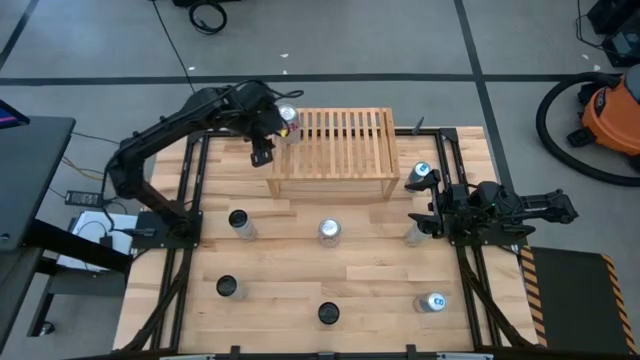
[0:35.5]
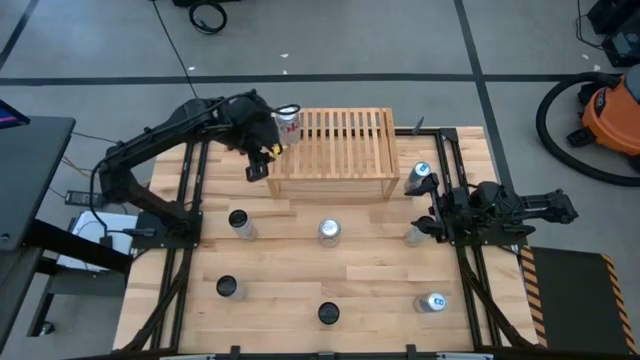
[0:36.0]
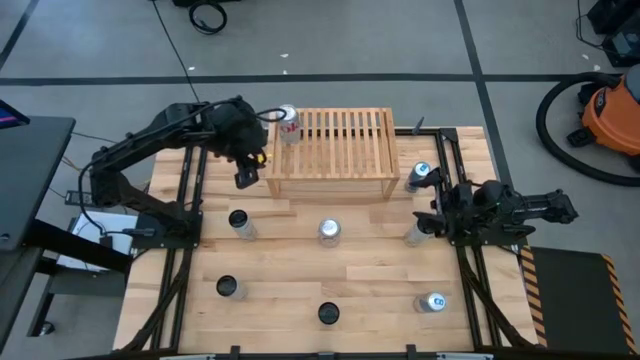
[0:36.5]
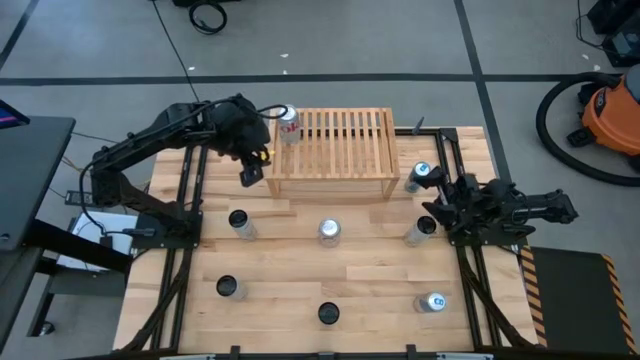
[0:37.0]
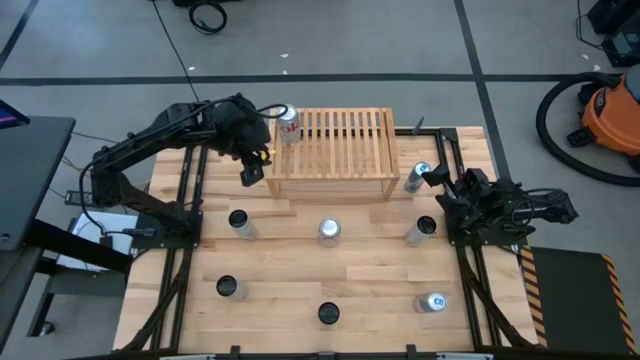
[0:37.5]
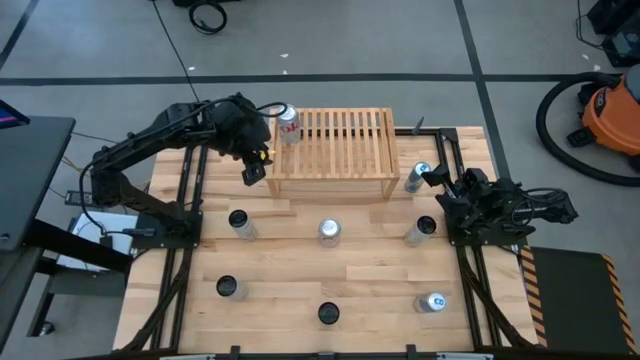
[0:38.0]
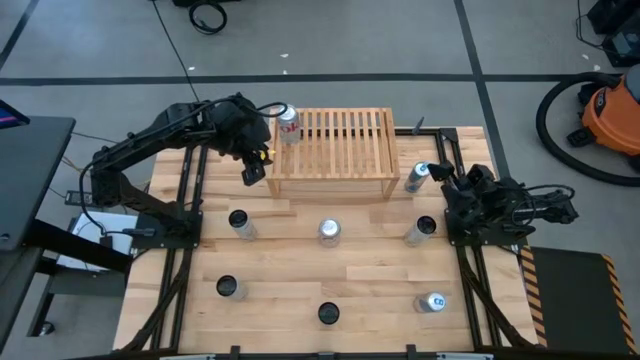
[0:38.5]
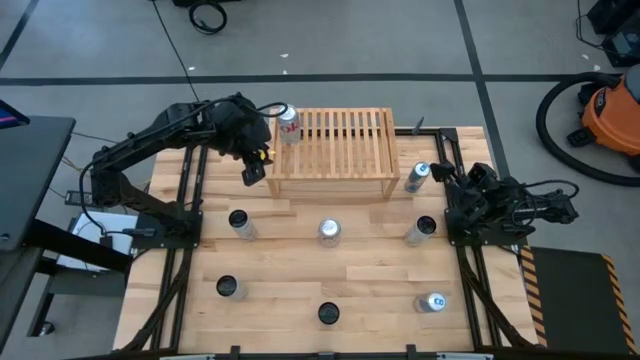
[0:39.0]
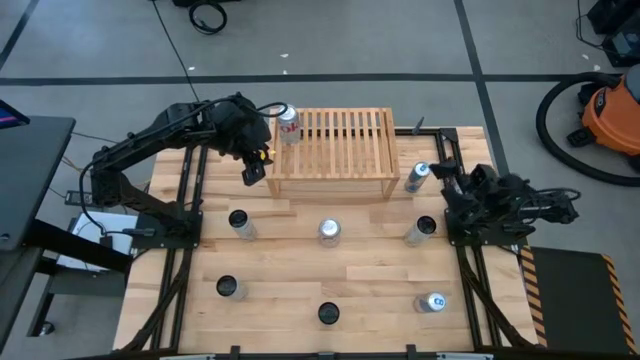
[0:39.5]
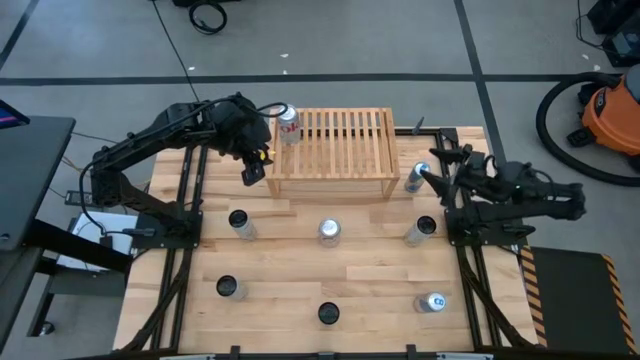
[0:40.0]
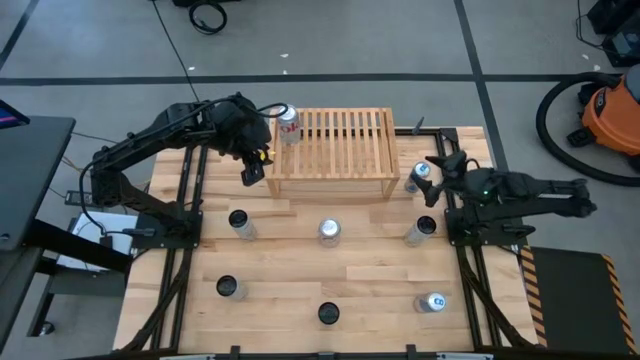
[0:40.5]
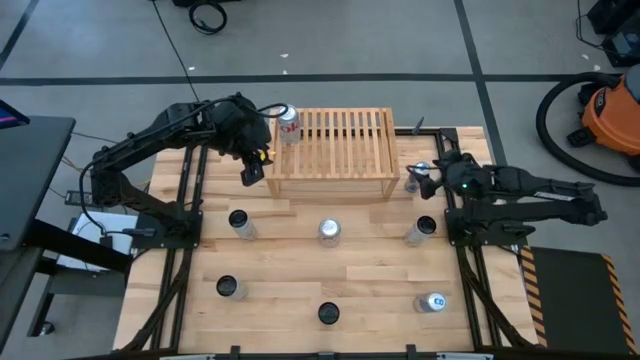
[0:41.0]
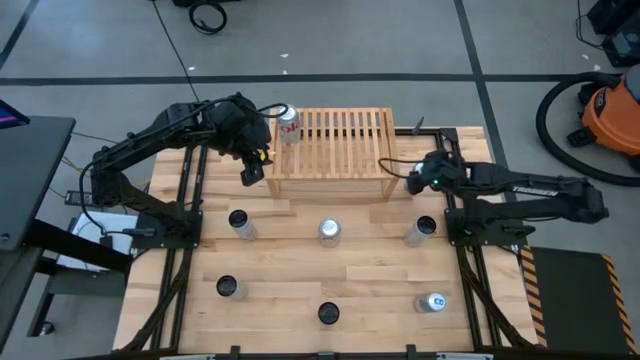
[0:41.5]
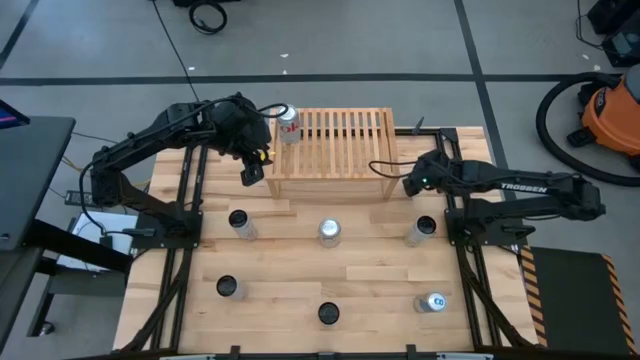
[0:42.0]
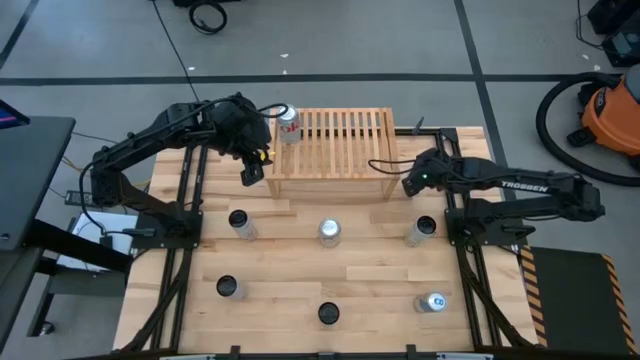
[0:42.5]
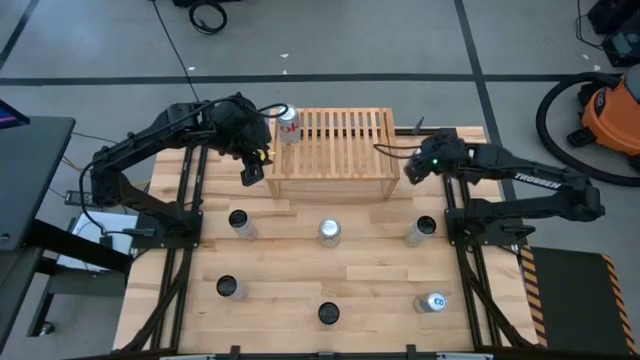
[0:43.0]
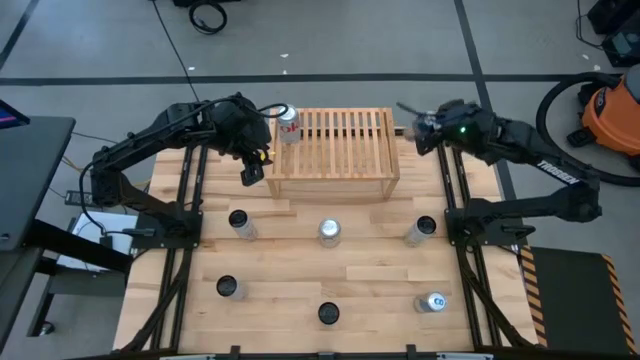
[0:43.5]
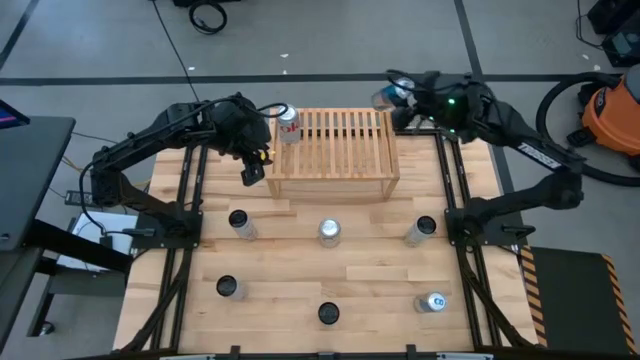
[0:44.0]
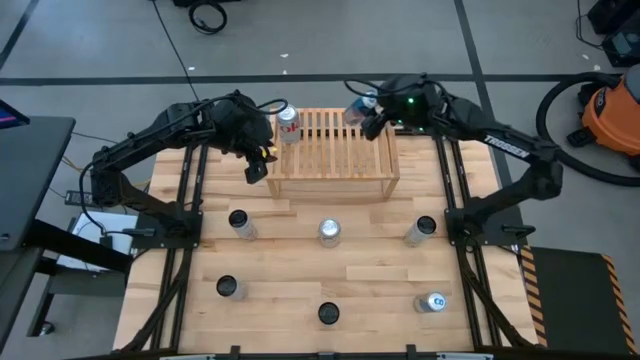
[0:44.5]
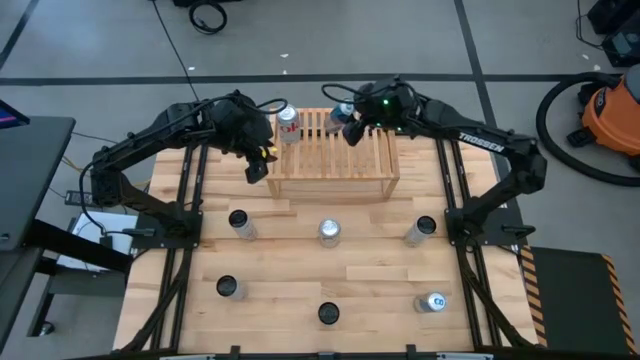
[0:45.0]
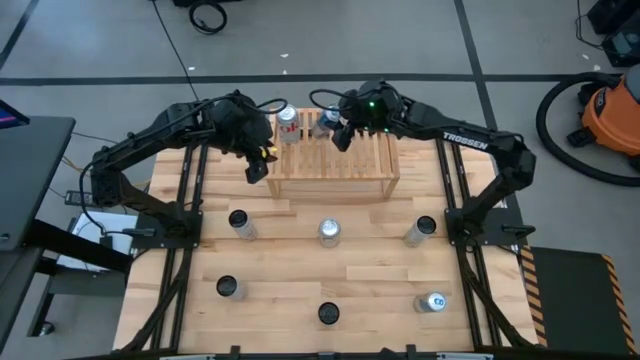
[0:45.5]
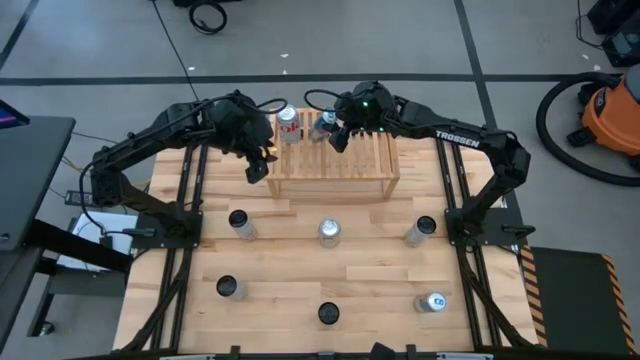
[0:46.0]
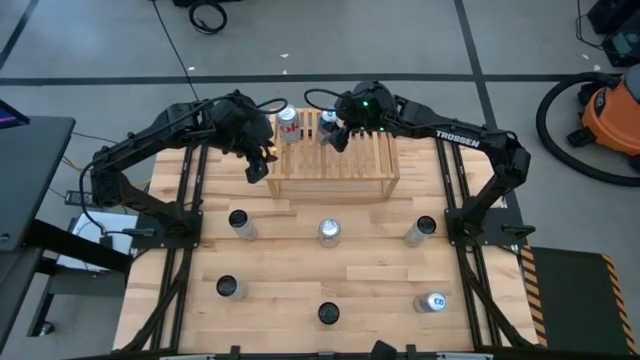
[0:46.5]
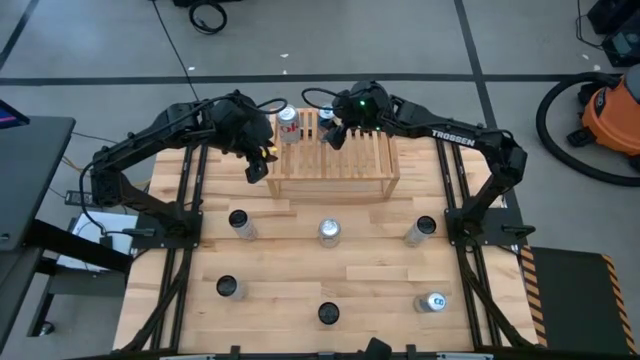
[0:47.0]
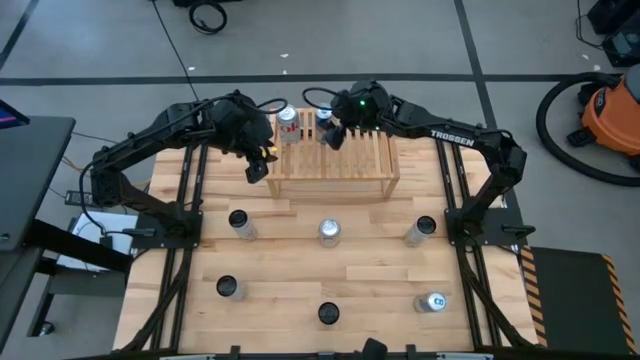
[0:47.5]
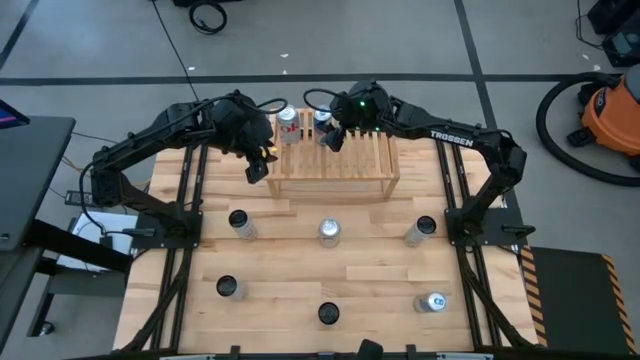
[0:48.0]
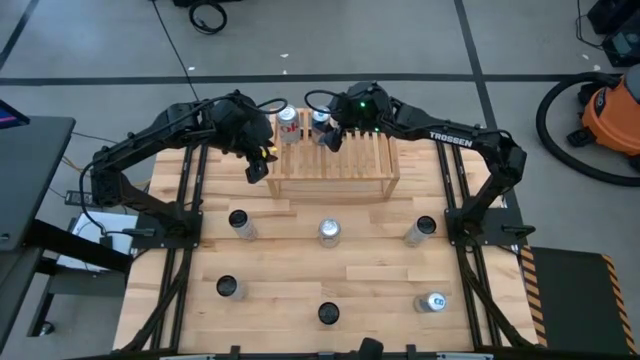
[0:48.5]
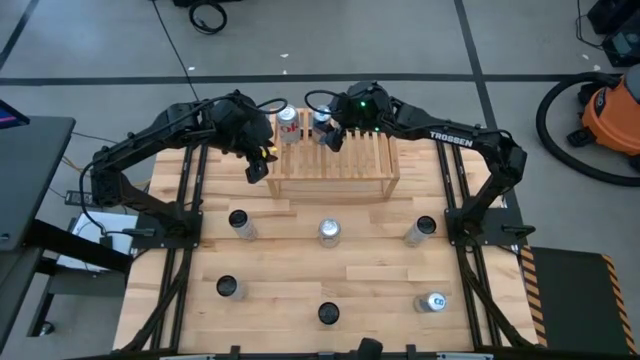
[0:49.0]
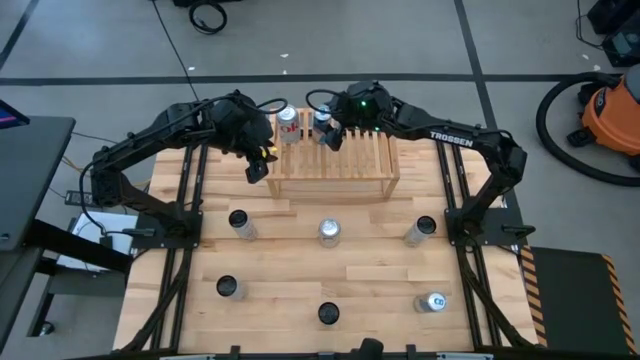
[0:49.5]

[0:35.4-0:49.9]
Task: Place canned beverage on shelf
Put the top blue soda can on the shelf
